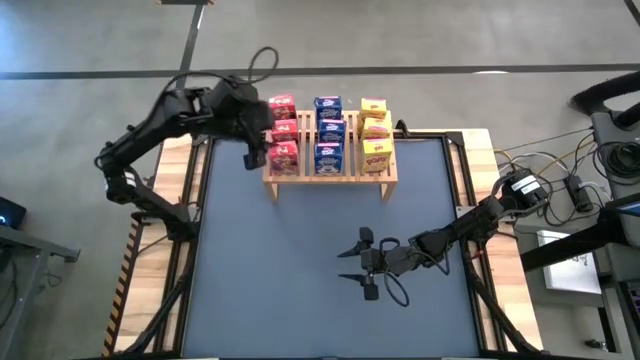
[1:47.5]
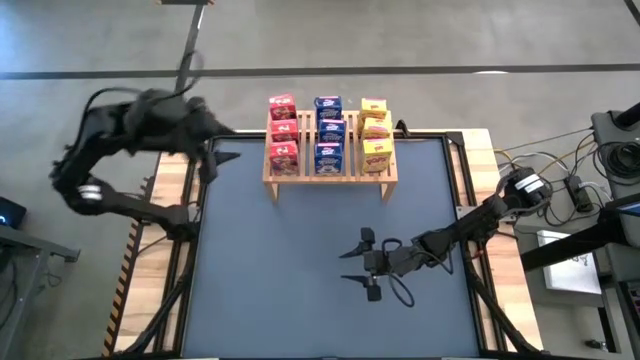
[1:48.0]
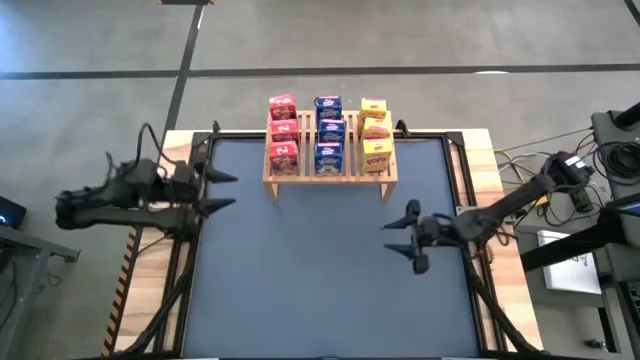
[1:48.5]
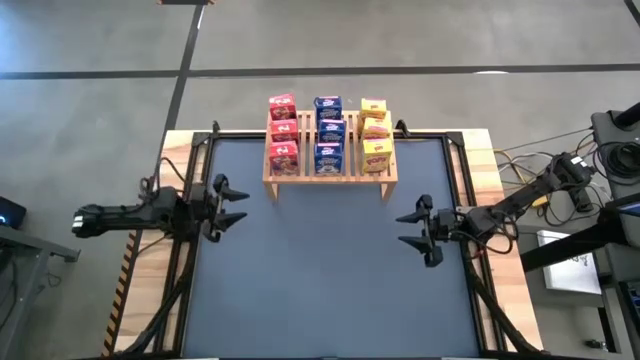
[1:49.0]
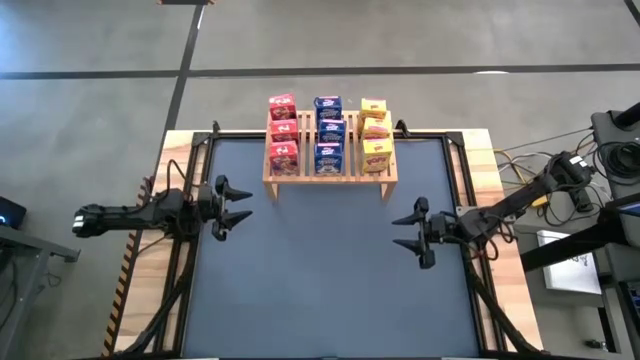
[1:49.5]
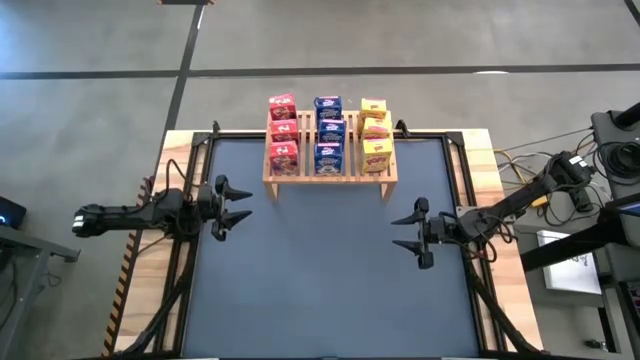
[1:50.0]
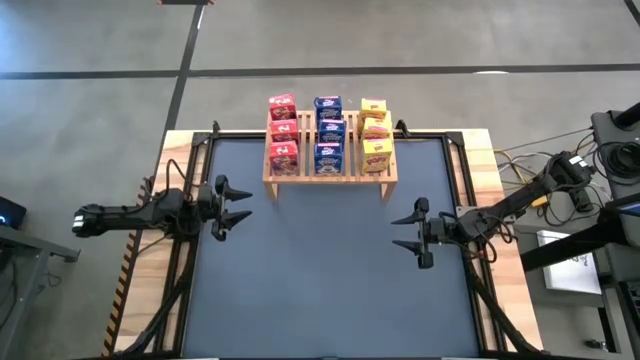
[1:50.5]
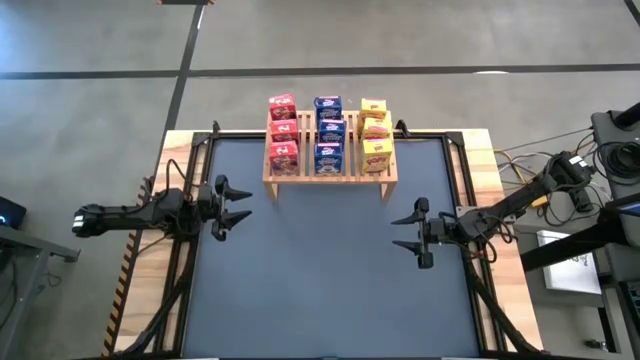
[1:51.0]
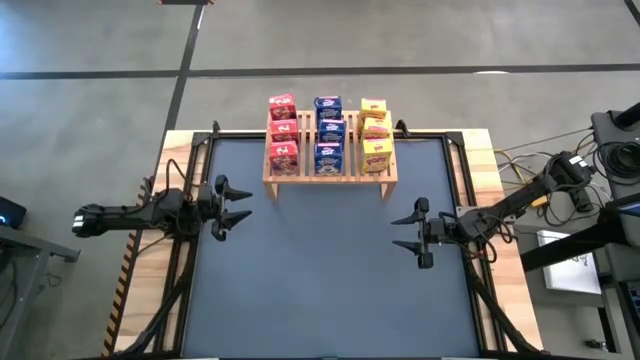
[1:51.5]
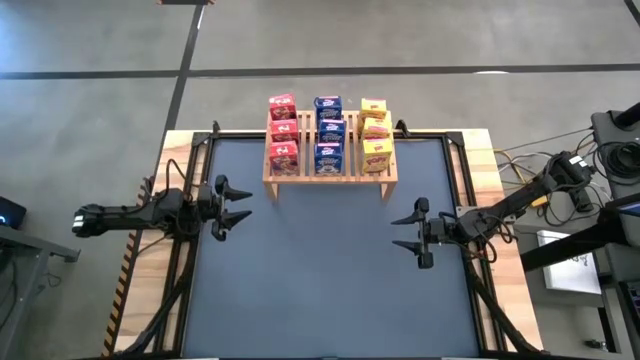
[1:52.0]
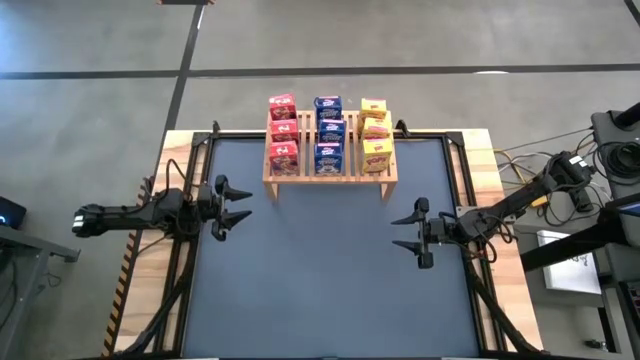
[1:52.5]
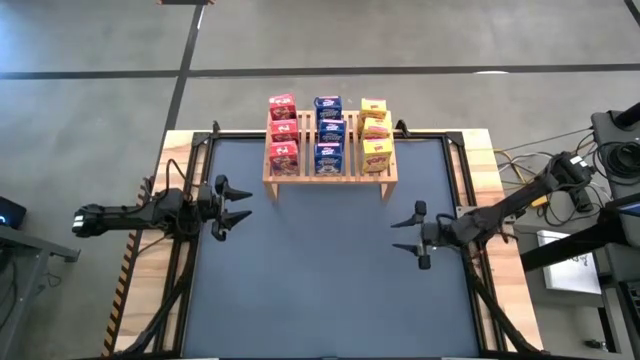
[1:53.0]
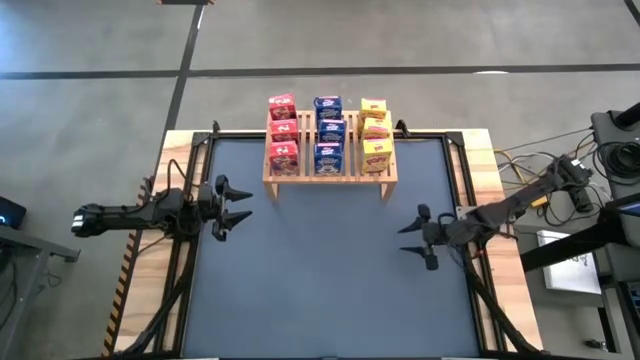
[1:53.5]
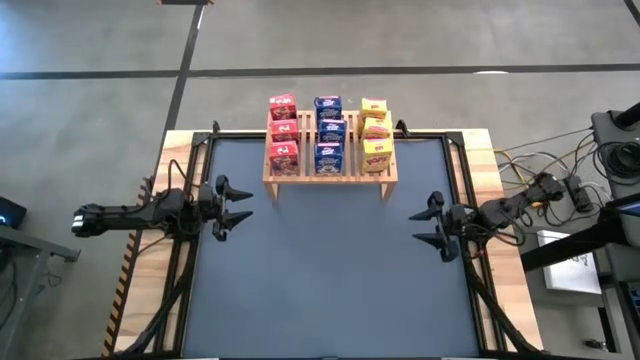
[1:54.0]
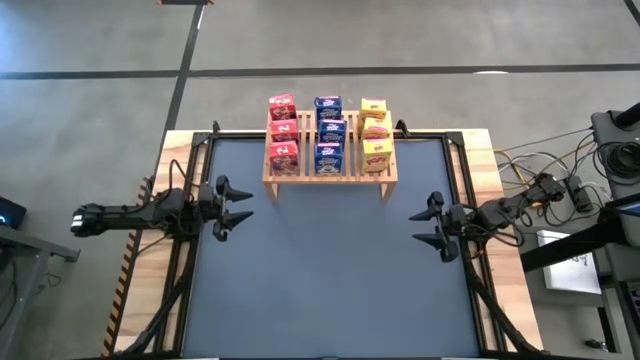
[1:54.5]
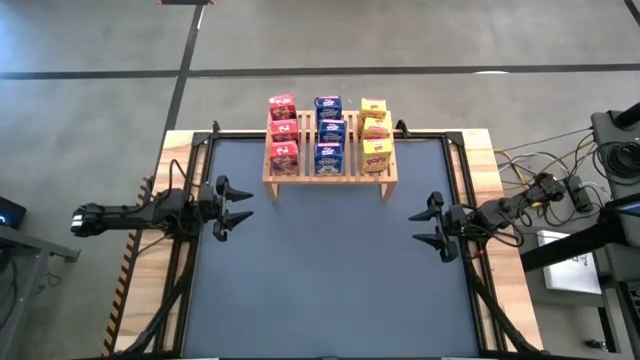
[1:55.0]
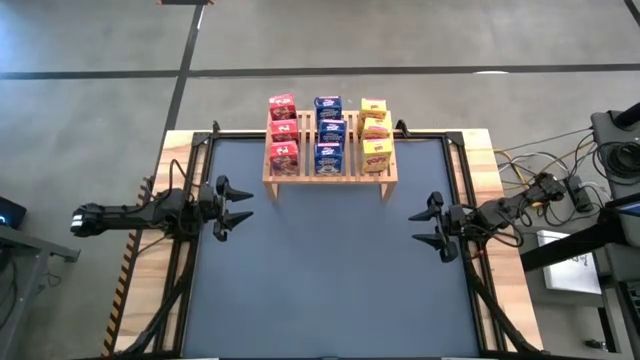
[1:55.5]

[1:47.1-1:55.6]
Task: Stack cereal on shelf
Return To Home Position

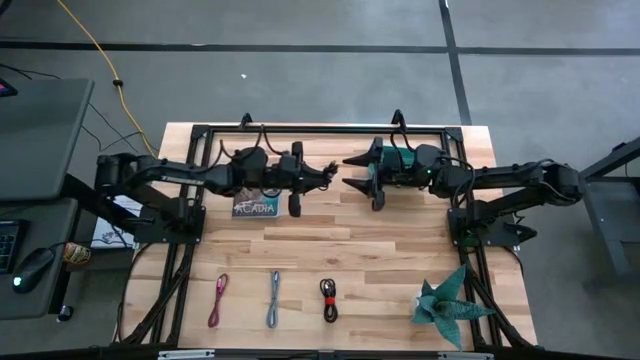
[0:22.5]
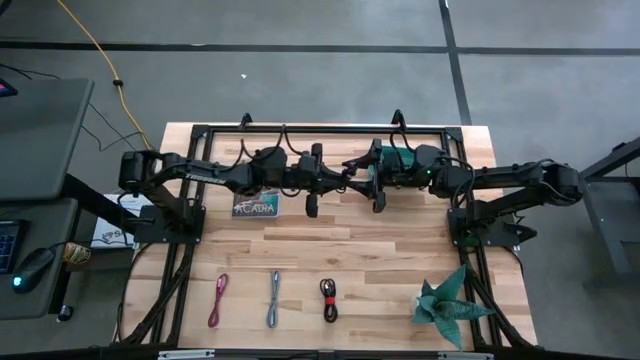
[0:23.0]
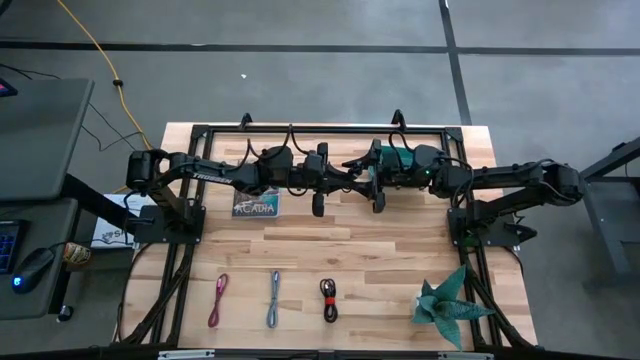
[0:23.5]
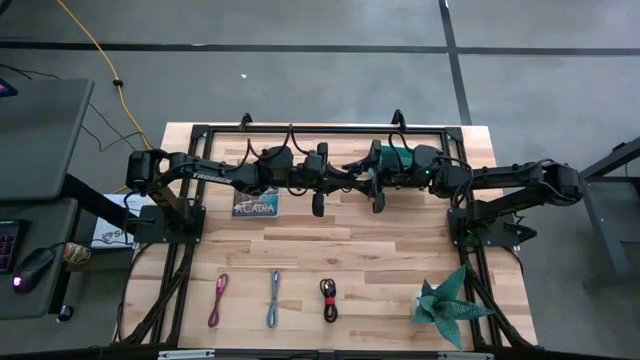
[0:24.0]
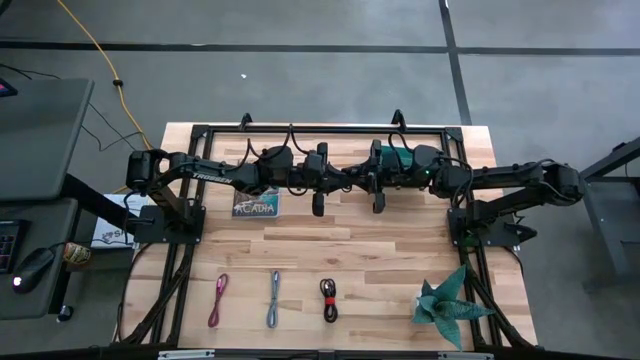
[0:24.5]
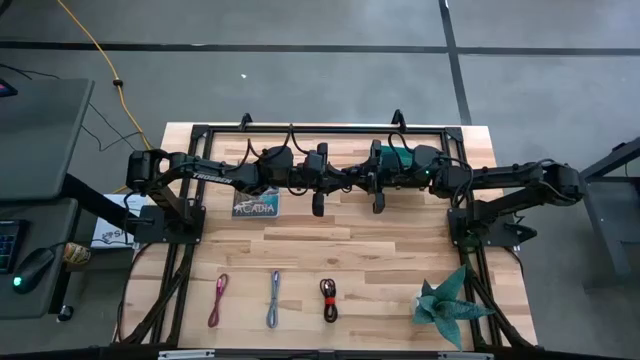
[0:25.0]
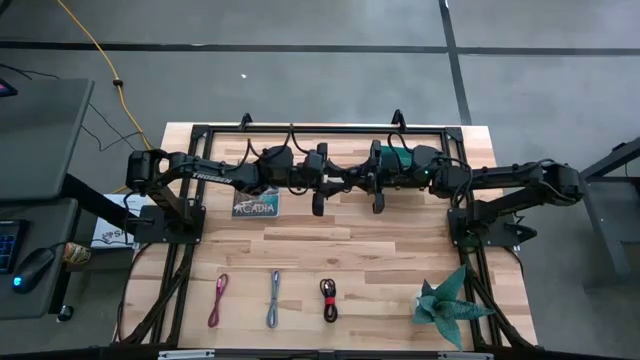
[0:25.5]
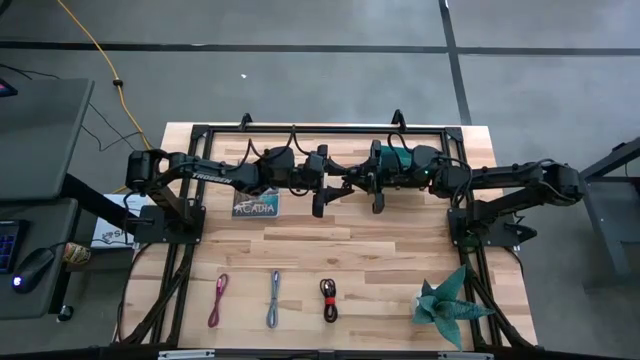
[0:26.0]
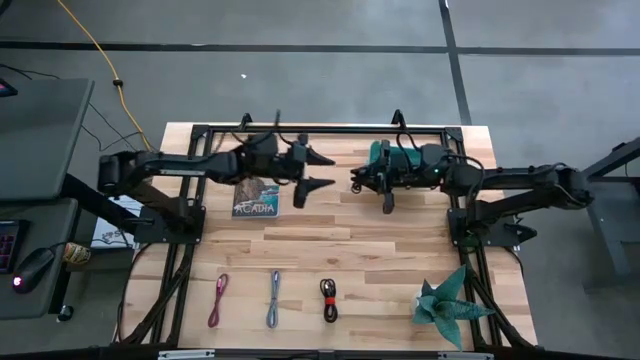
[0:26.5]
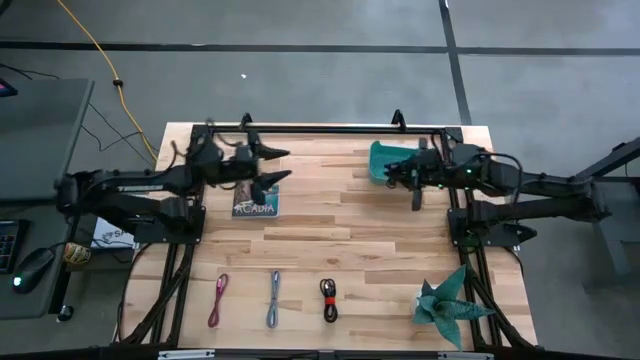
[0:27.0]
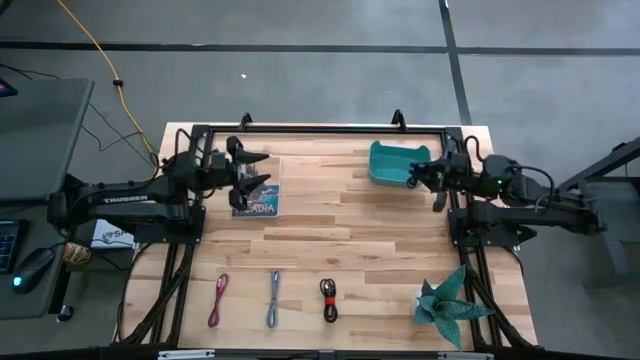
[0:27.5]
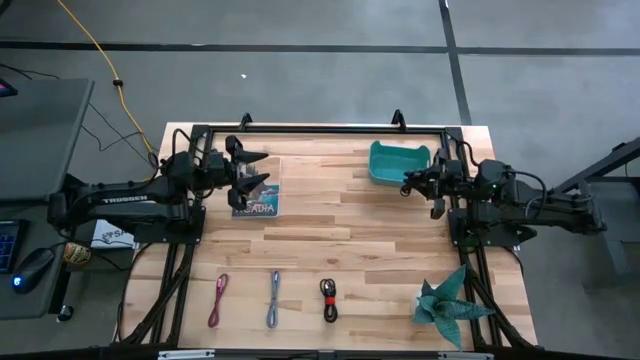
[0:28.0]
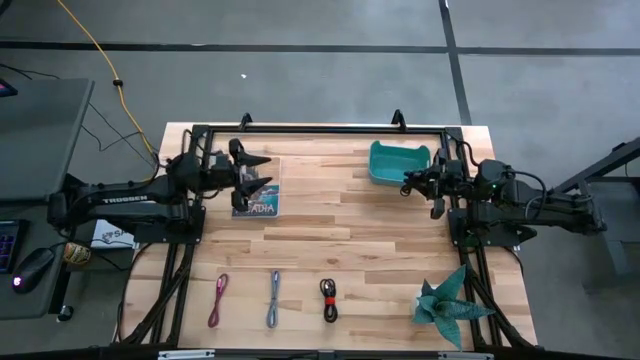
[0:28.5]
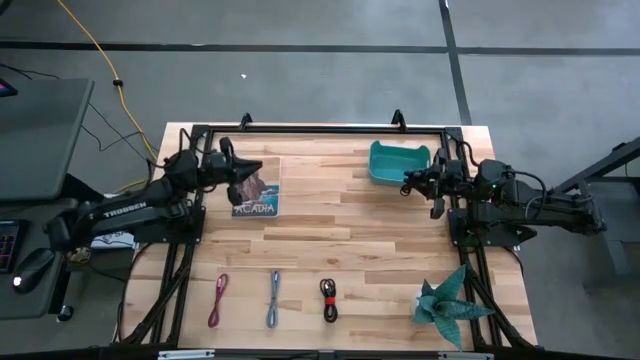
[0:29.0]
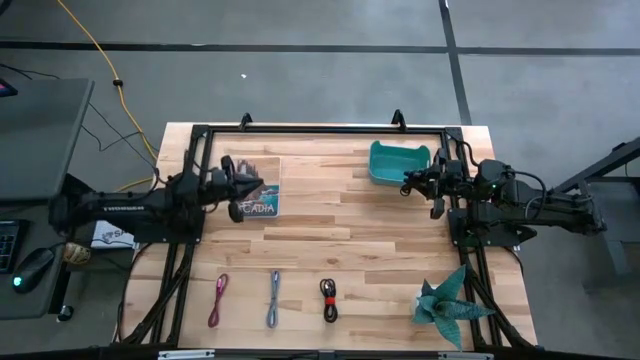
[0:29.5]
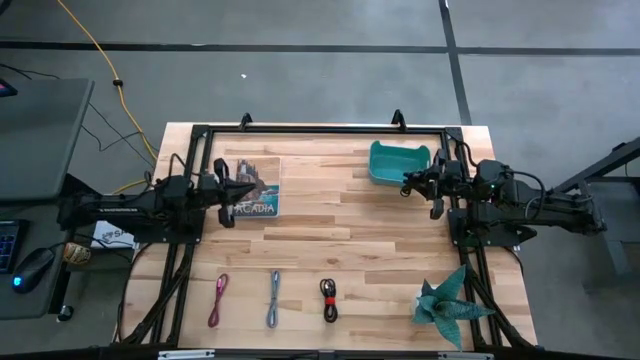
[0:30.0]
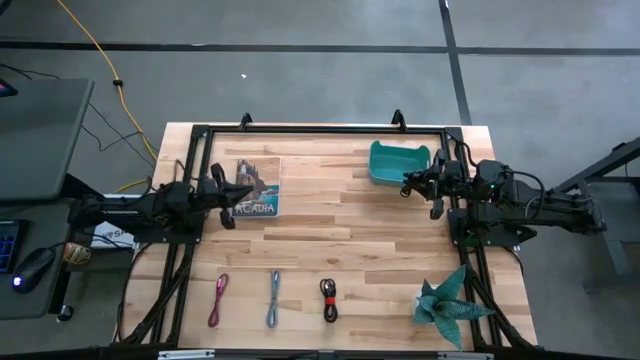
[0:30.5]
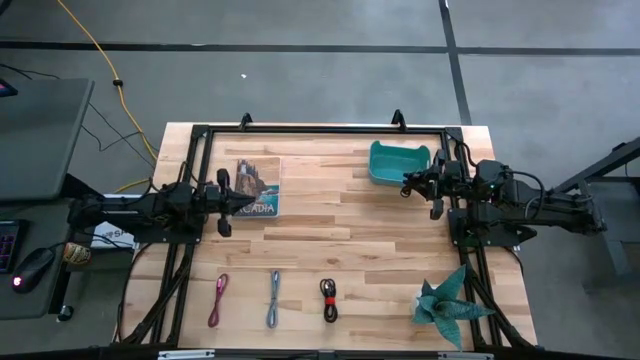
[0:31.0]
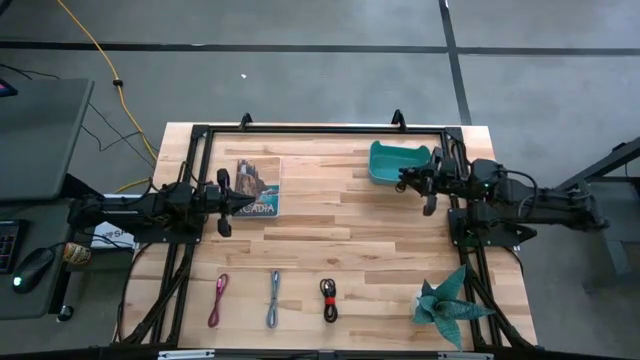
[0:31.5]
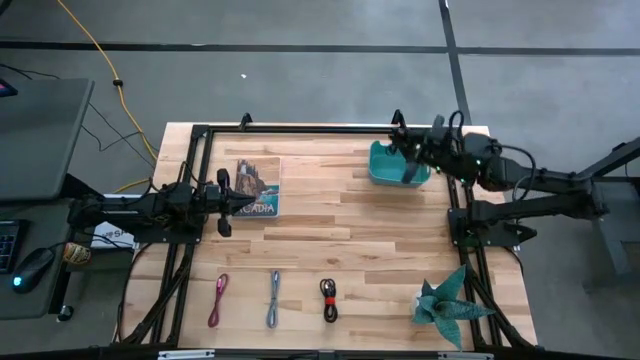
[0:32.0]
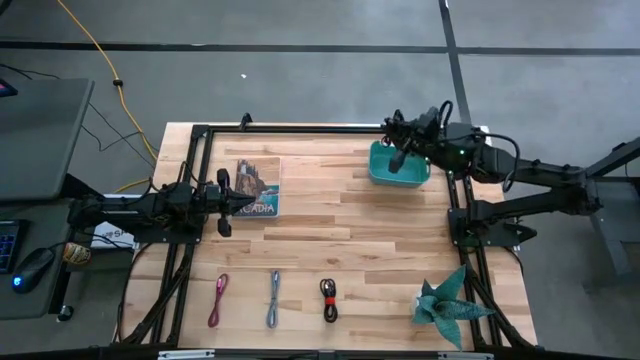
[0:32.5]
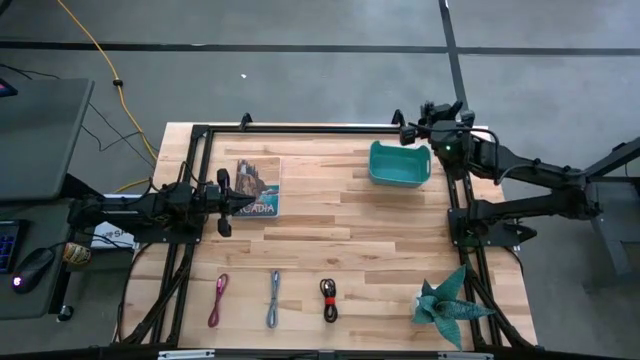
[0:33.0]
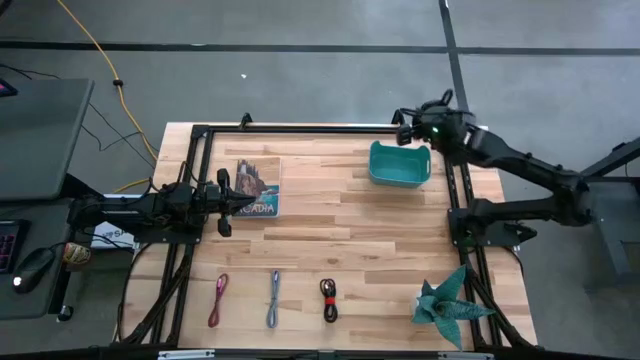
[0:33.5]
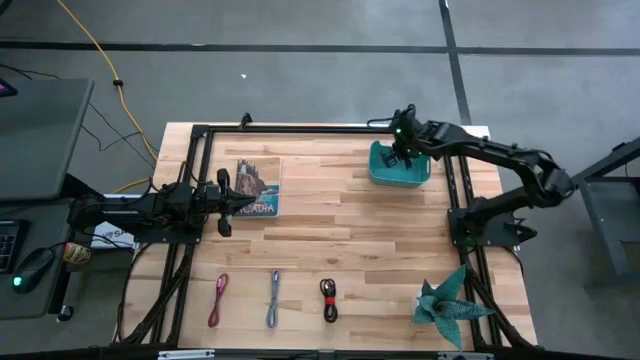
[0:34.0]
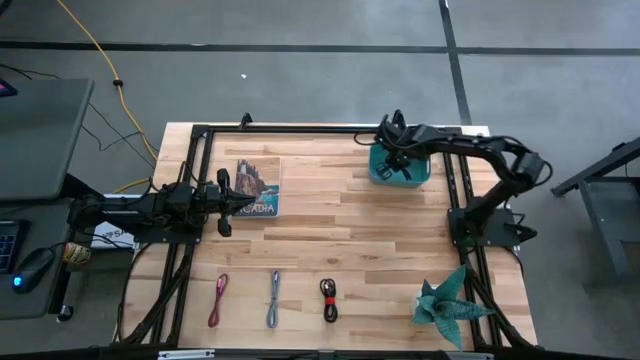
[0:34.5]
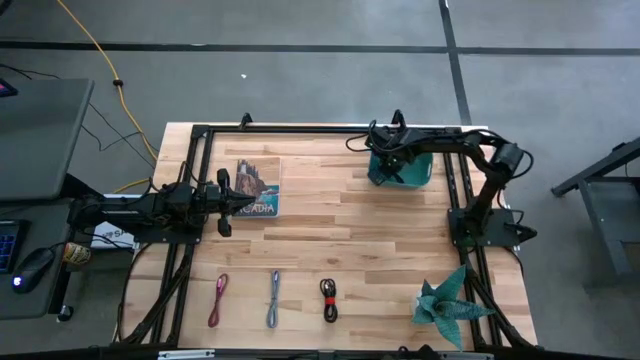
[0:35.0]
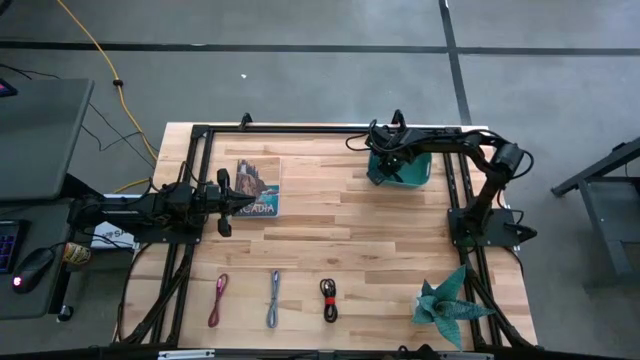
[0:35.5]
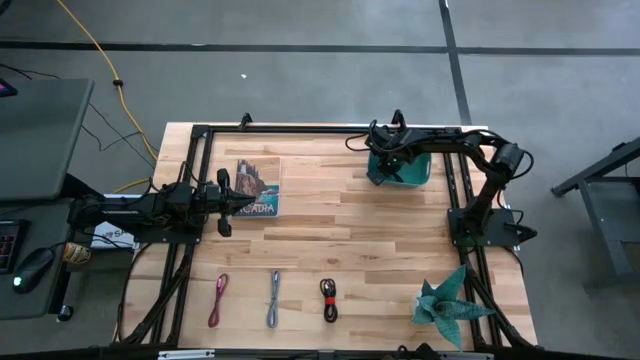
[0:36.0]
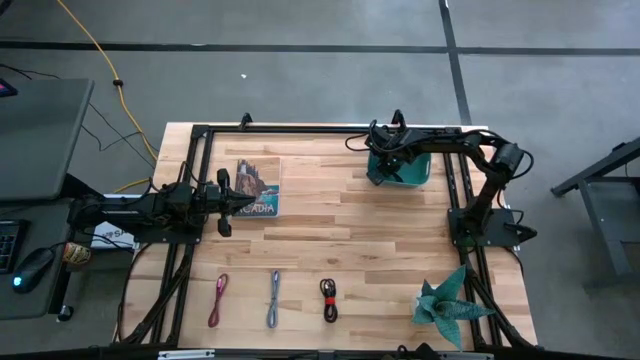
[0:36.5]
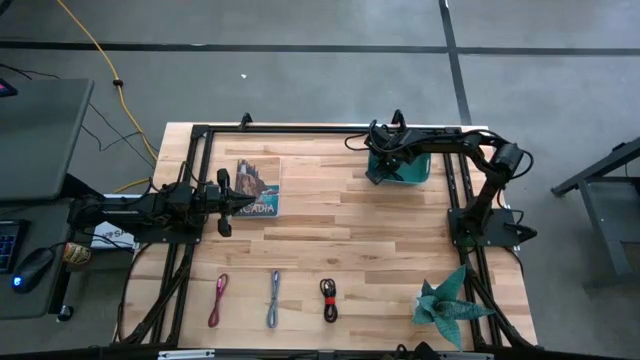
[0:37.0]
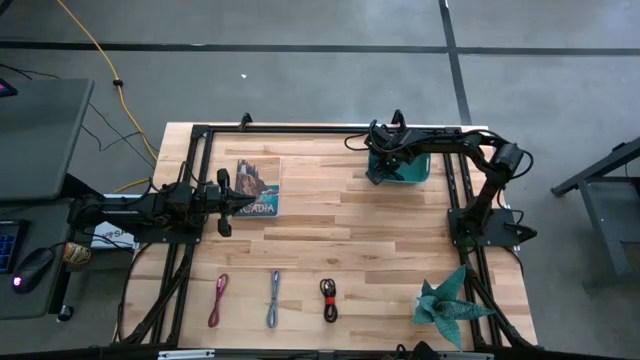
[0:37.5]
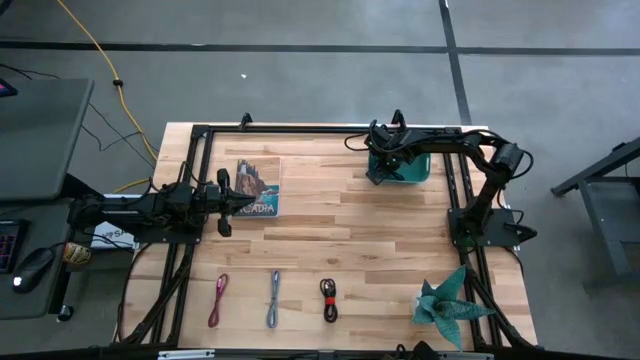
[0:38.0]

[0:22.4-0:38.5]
Task: Pick and place USB-C Cables
Put the left black charger cable into the green bin
